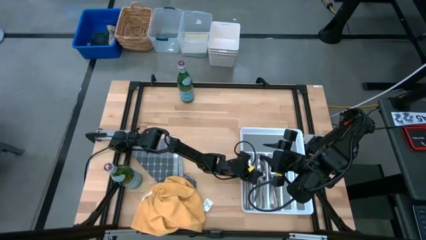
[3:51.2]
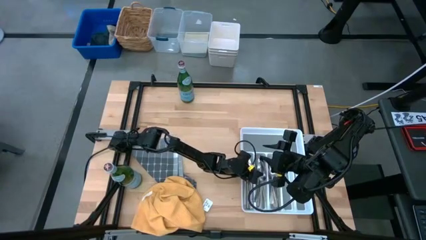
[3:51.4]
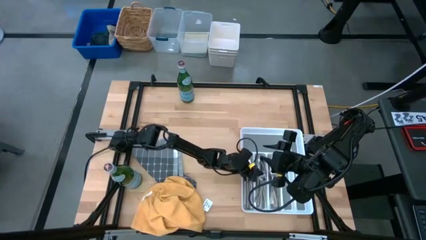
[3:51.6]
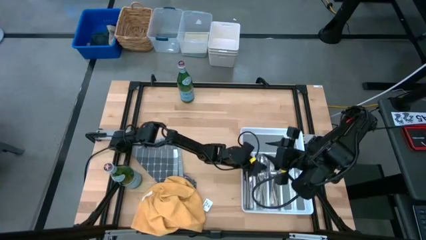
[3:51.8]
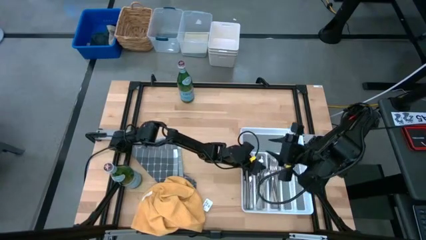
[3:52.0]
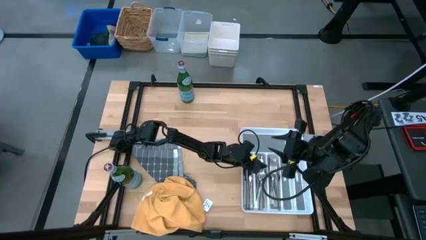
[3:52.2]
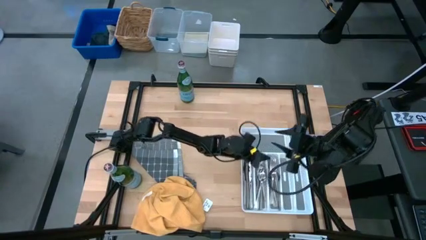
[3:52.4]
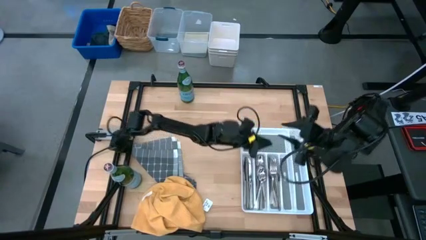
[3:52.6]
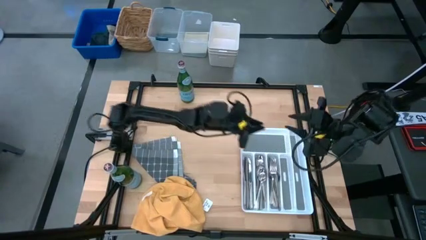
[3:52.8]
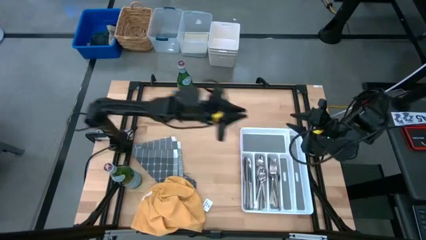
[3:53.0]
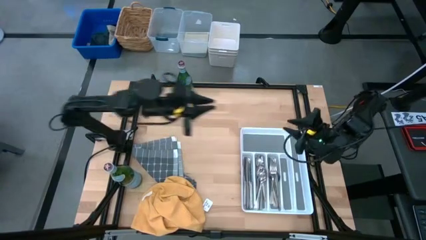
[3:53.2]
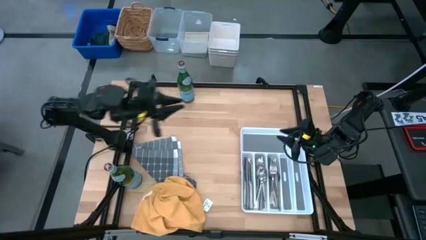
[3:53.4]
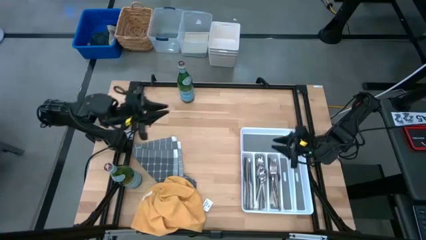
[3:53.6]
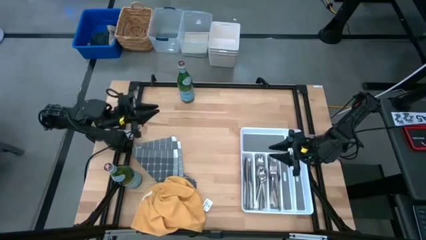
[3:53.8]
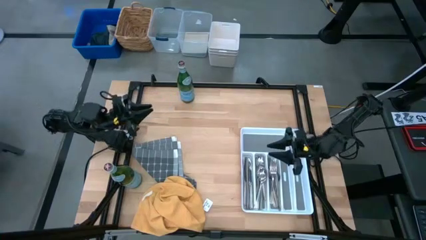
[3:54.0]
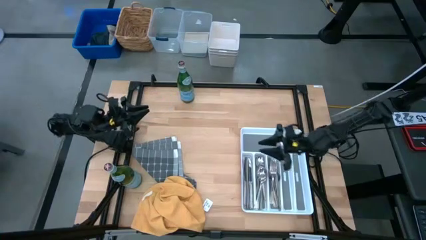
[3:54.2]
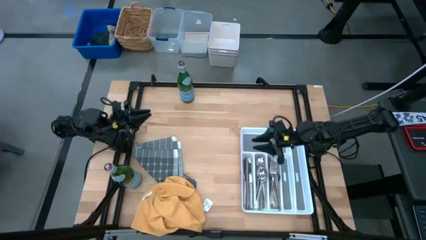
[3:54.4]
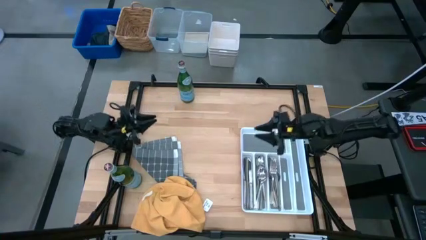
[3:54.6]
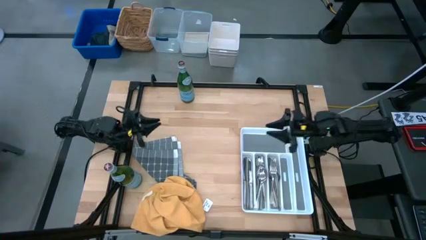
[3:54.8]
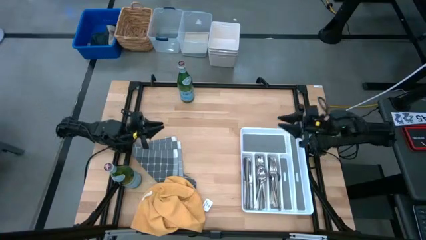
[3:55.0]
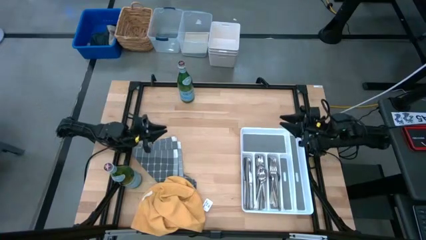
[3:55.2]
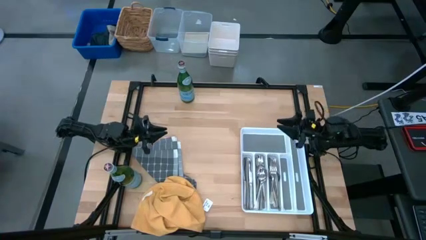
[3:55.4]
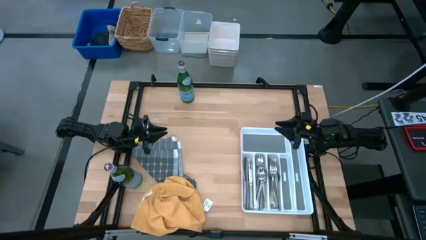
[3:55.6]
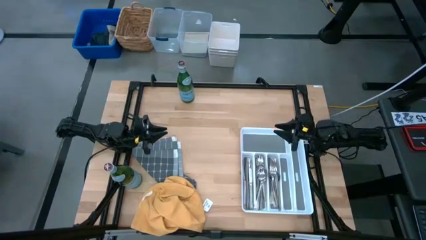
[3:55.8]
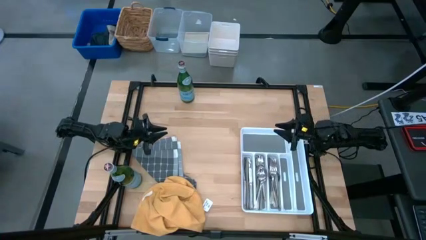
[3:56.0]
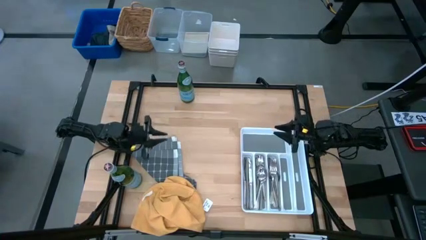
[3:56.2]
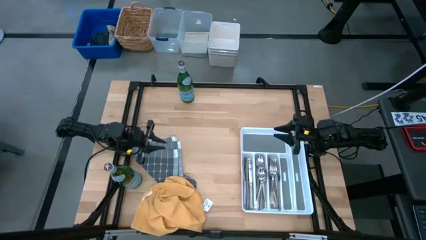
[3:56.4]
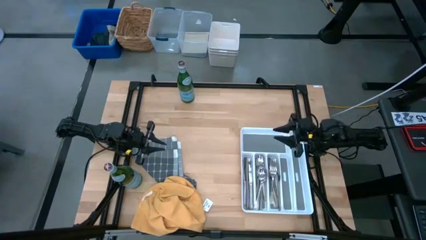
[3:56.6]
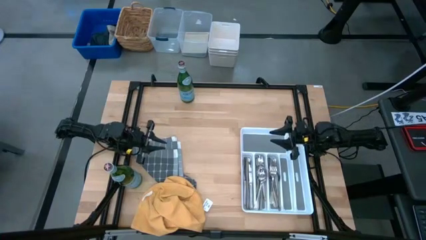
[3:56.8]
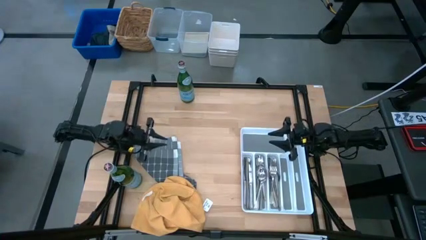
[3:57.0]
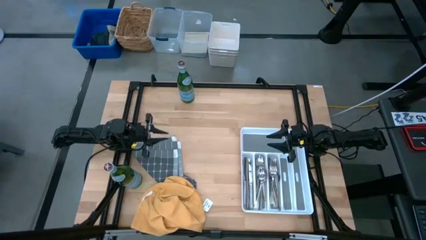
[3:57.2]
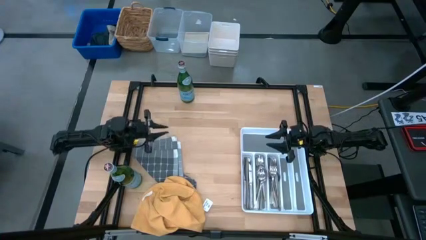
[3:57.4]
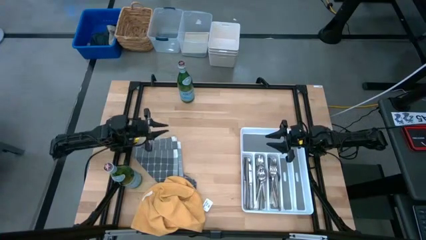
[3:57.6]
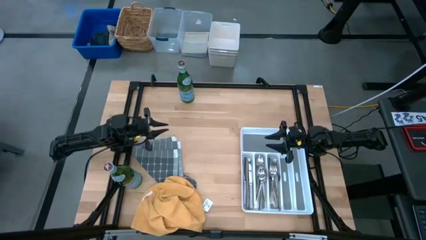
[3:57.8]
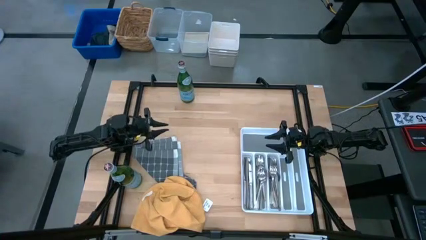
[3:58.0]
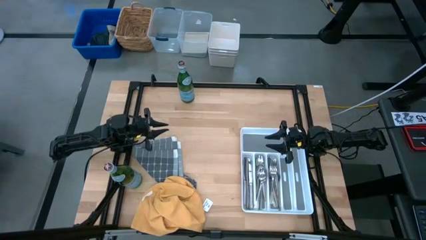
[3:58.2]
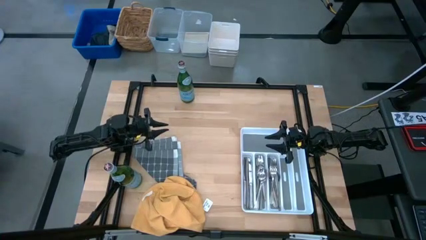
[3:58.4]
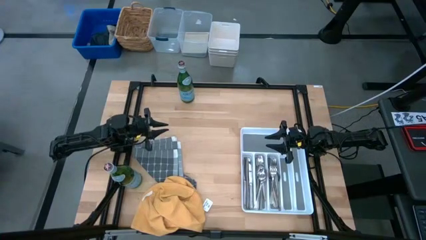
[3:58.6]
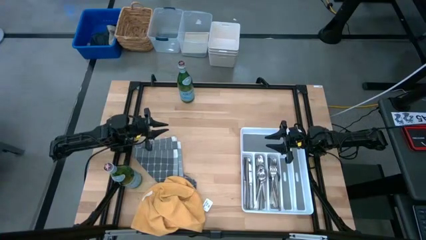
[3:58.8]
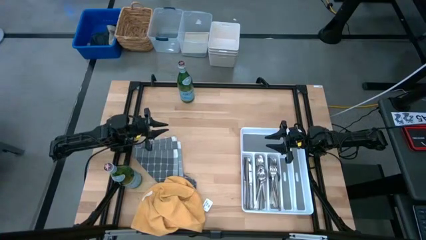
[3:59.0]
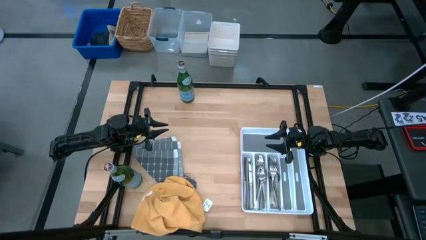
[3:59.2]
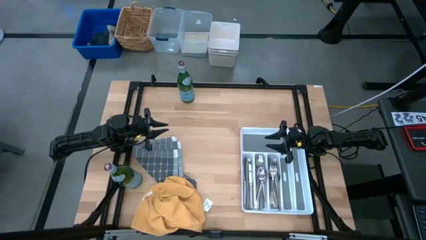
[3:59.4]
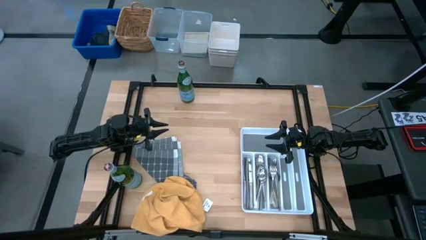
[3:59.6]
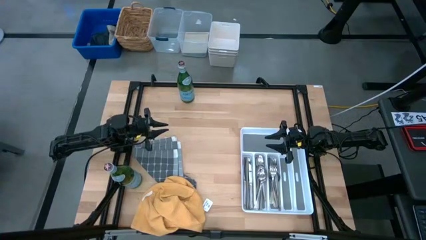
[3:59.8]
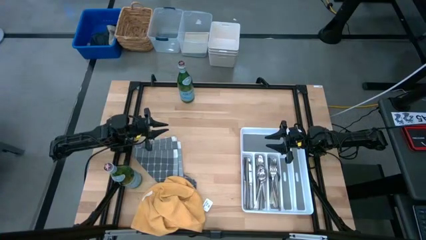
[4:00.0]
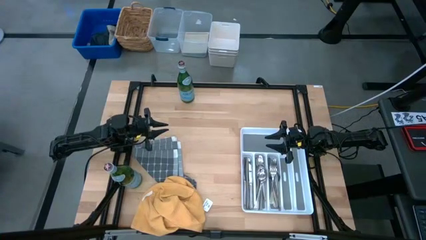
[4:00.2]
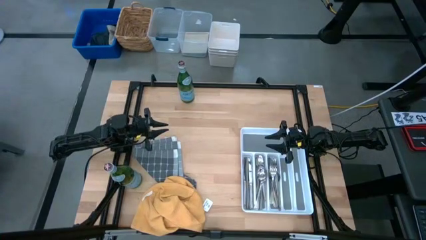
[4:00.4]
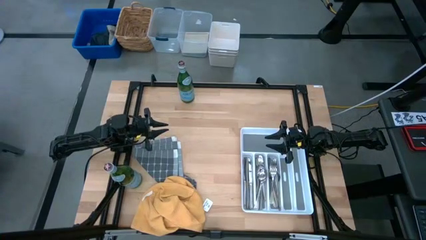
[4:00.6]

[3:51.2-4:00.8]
Return to Home Position
